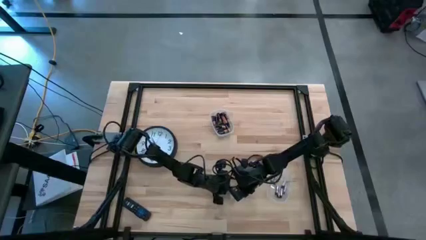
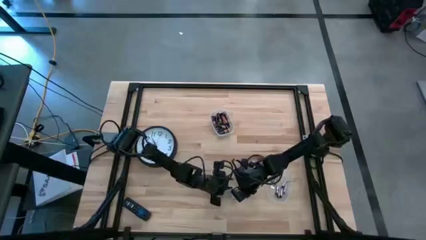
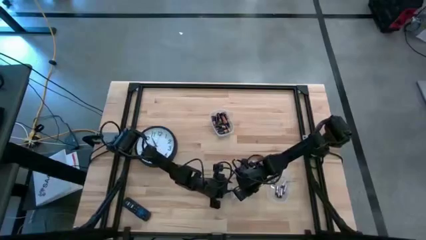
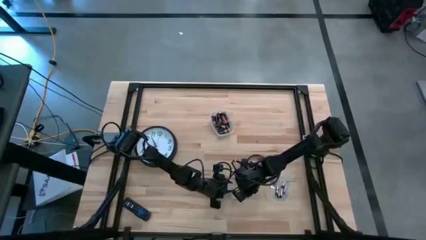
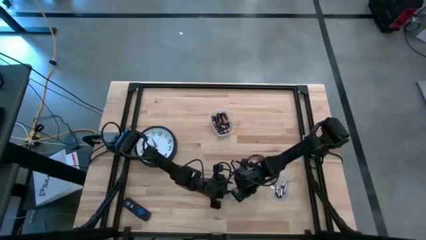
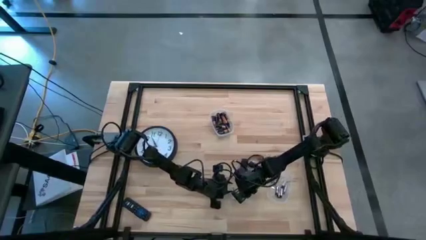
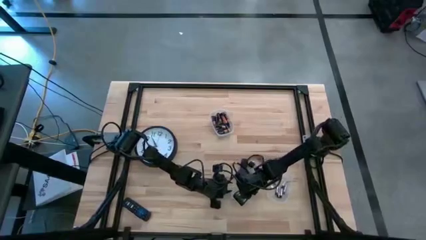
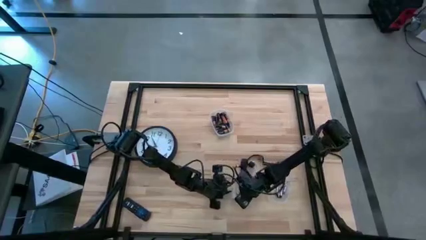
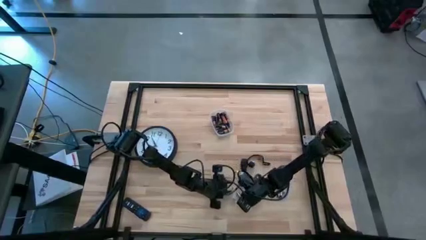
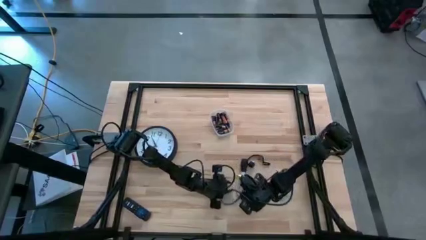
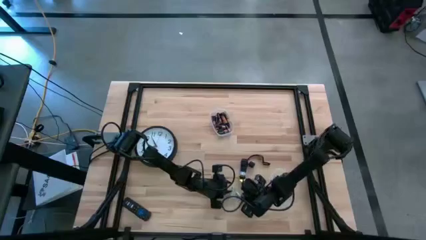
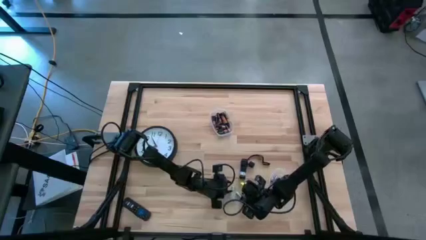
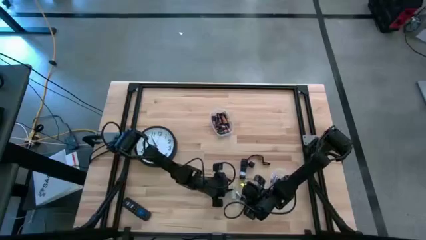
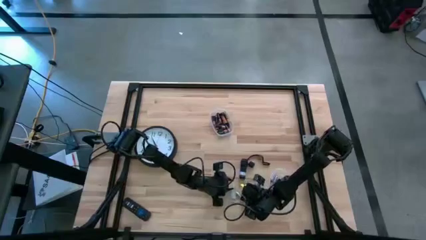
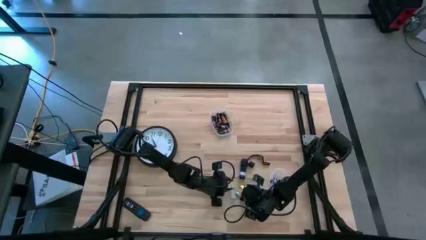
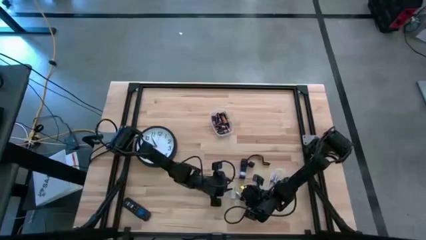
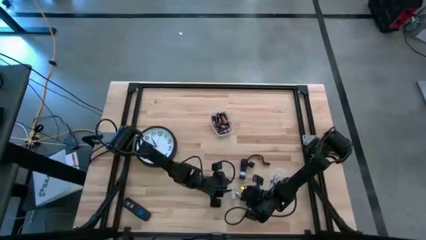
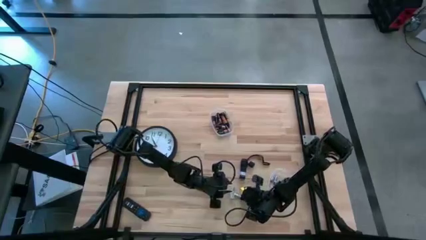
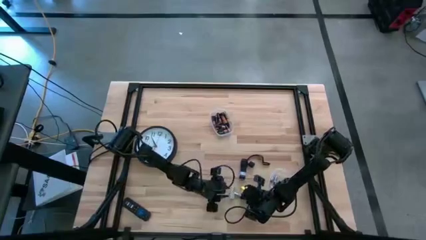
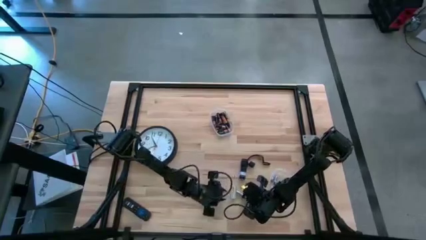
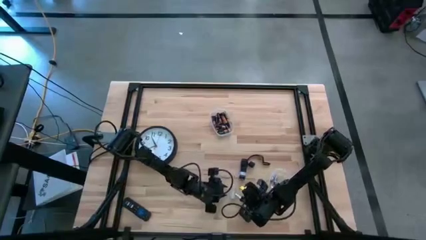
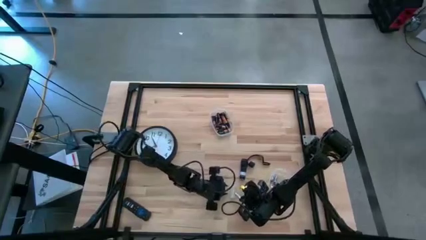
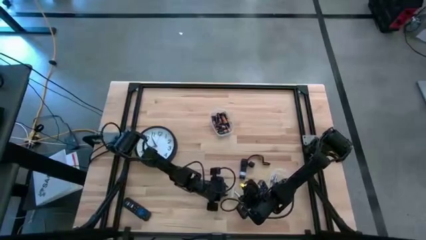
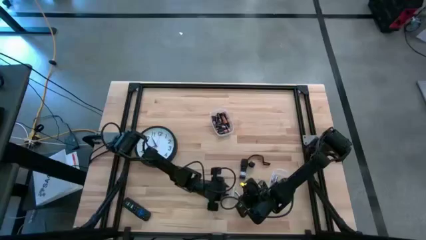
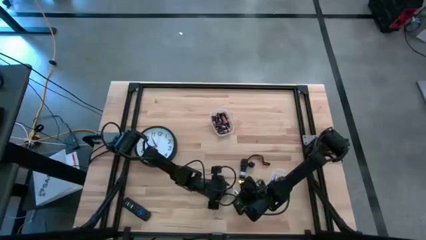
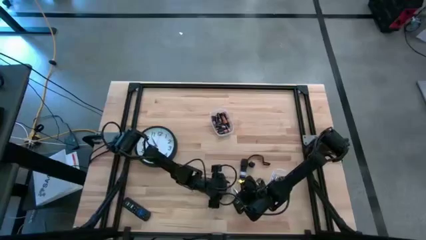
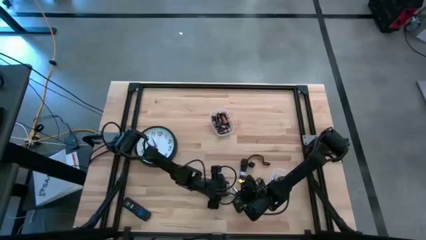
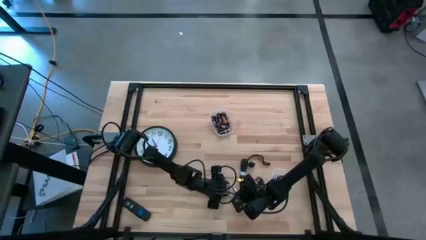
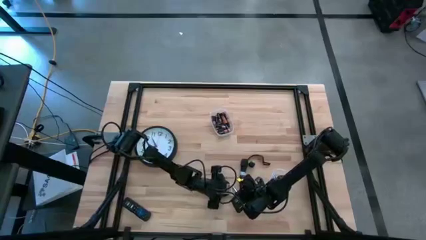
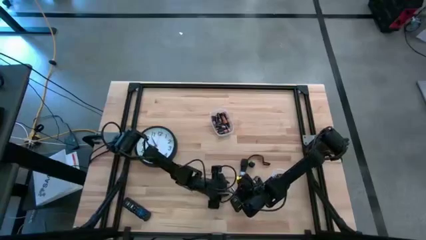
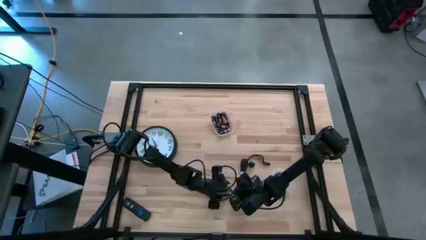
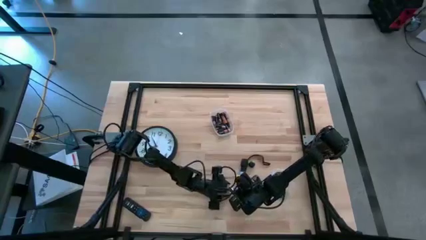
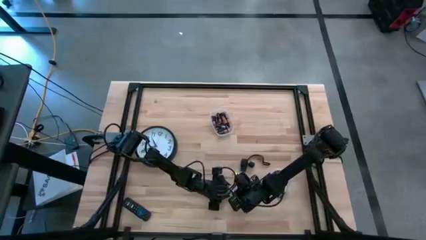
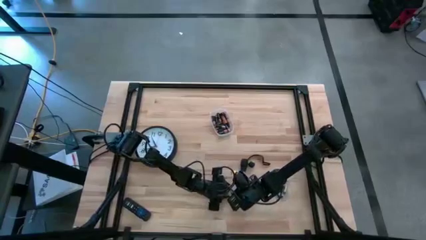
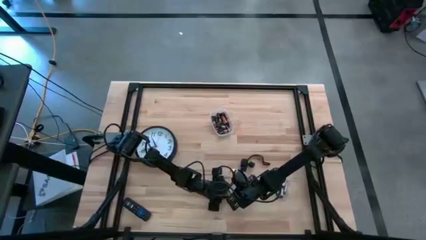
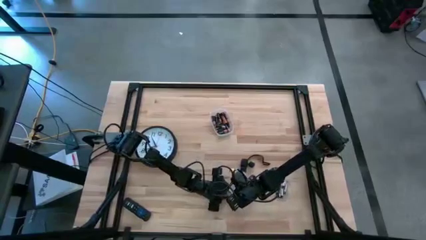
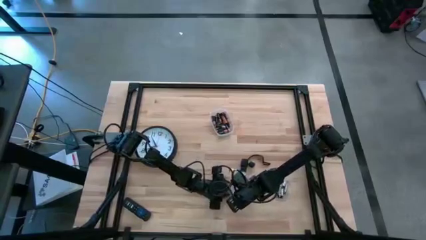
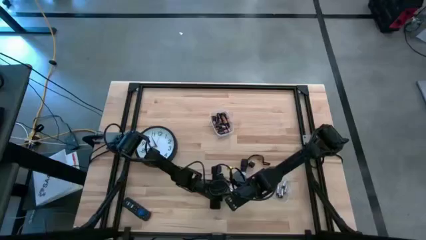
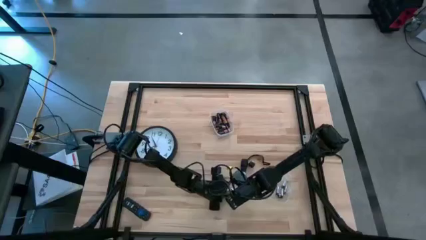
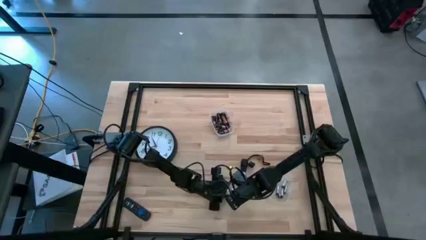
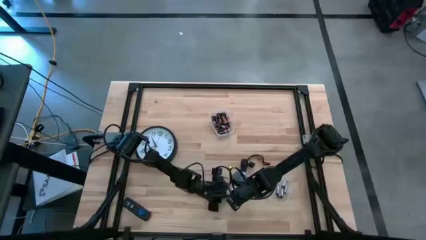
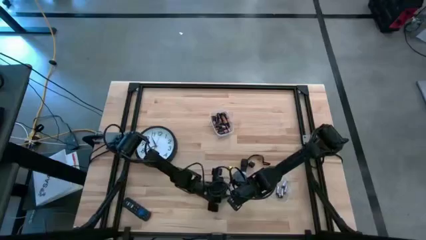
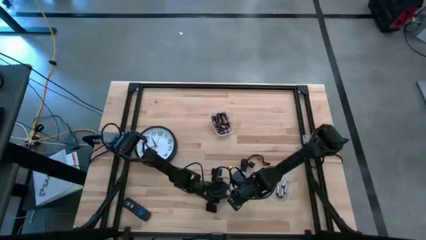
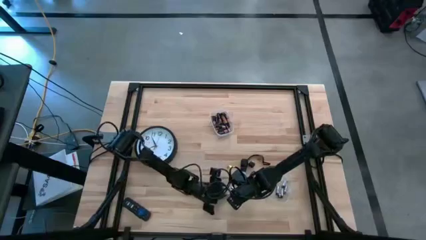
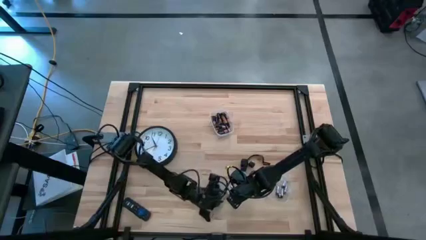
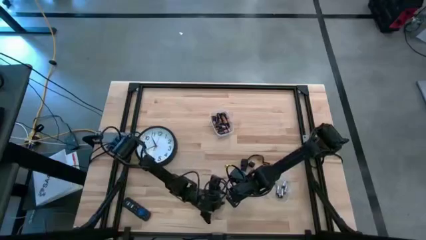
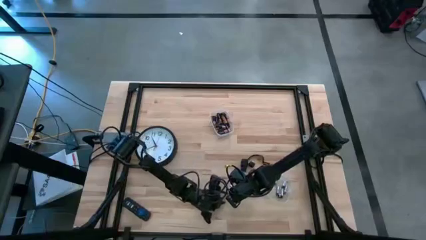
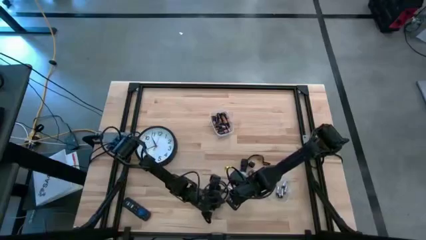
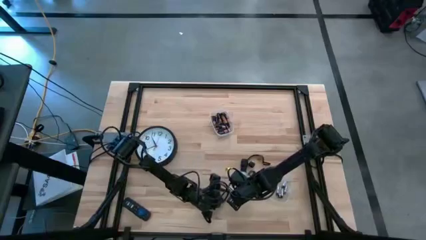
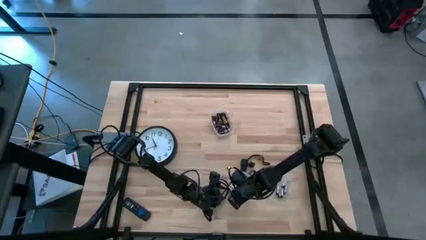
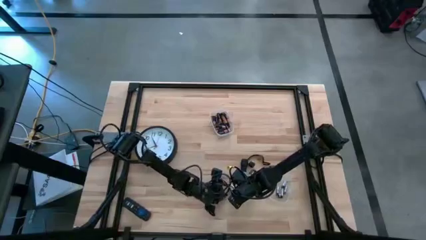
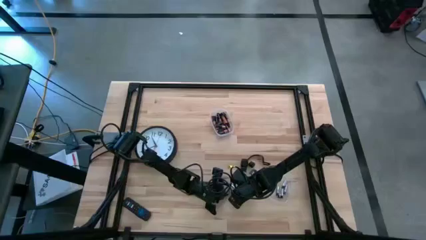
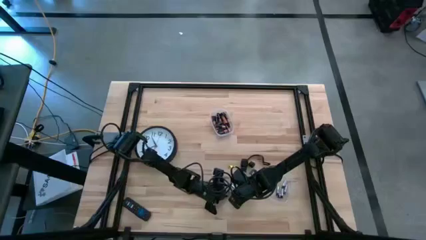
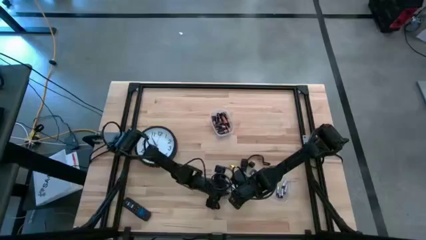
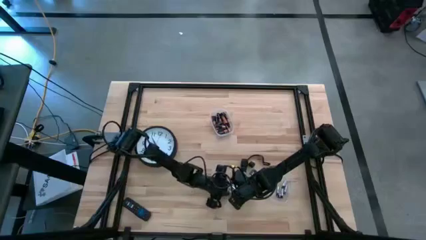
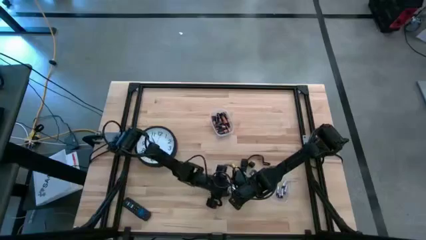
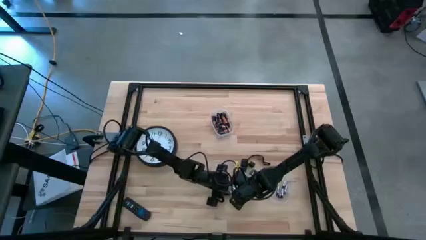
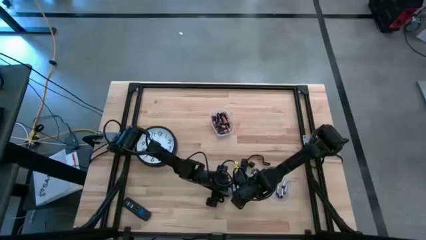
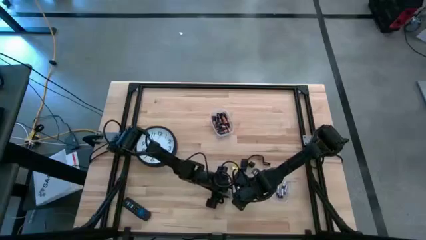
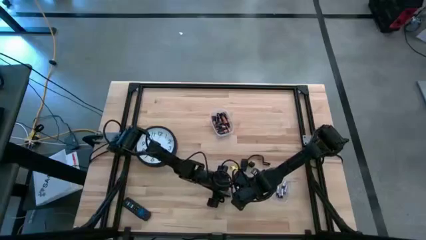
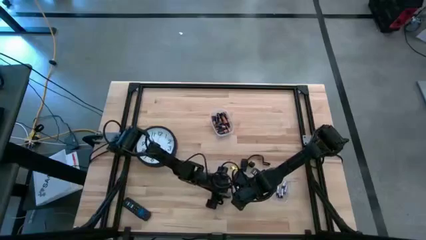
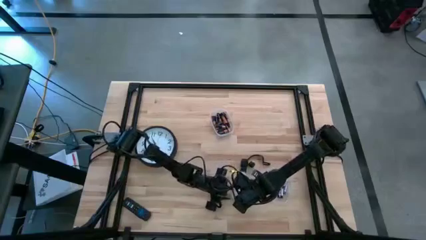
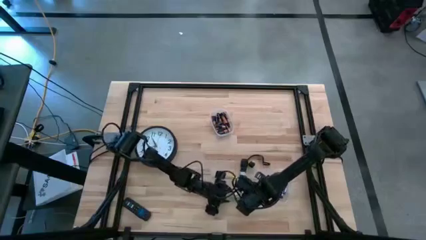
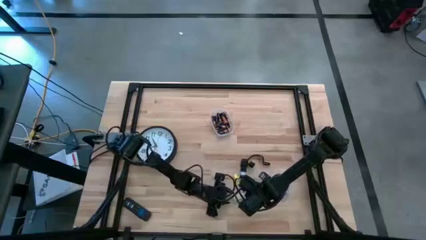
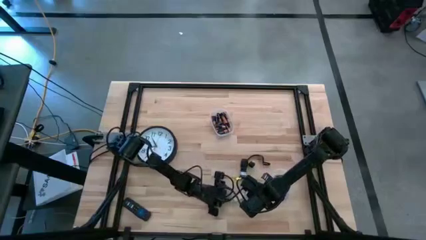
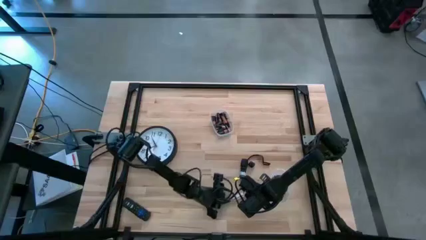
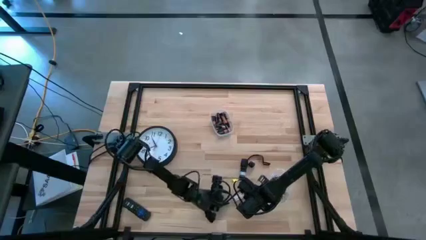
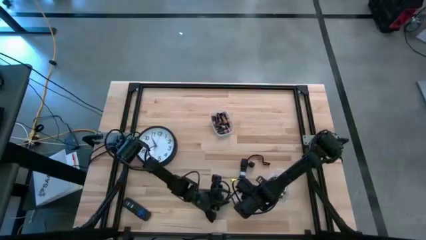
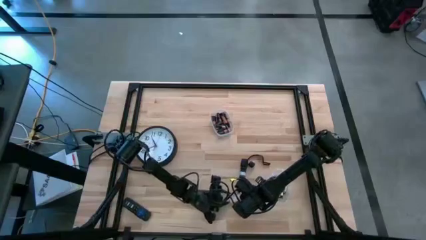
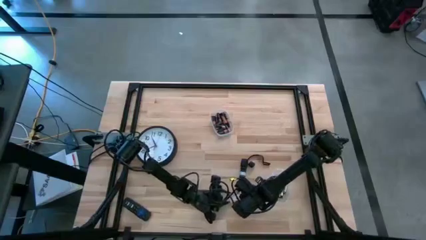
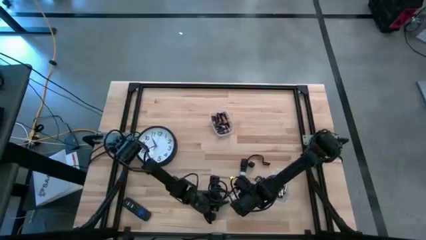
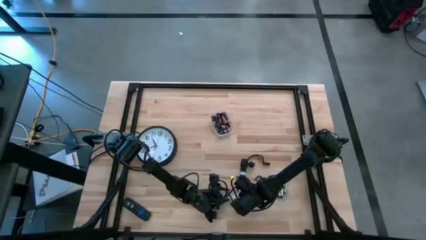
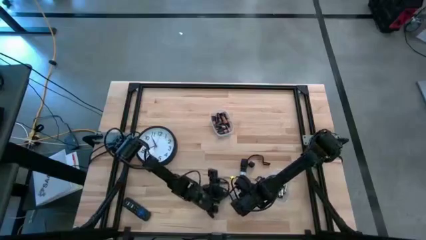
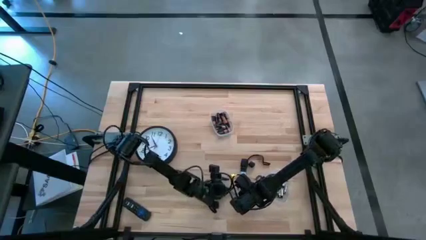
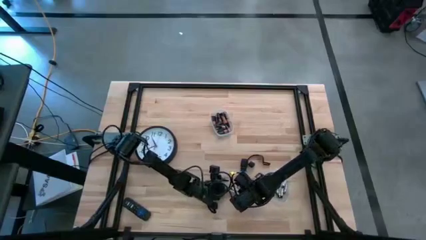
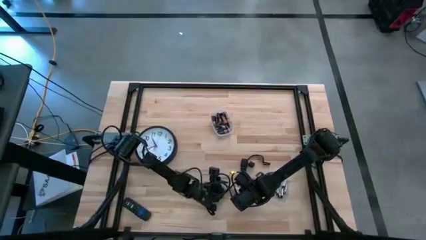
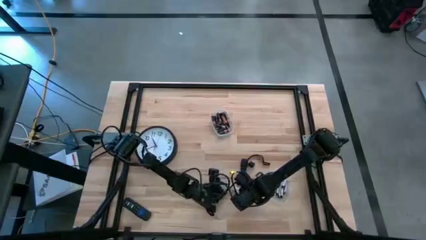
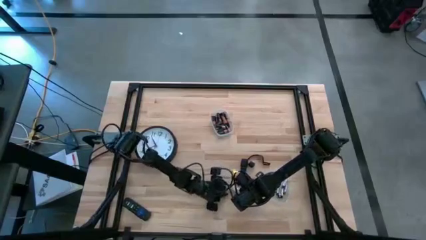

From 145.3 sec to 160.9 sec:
Task: Insert battery
Insert the silver battery into the battery holder

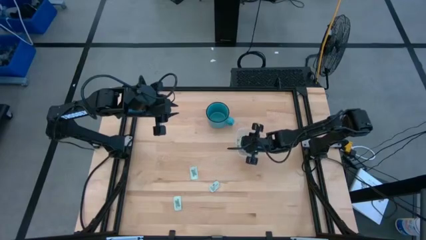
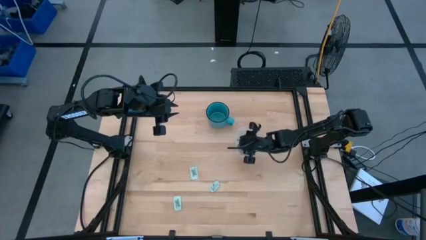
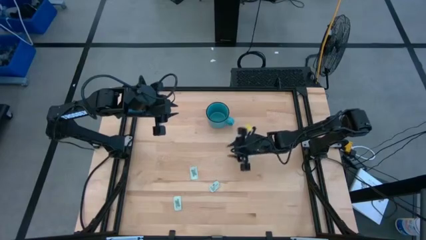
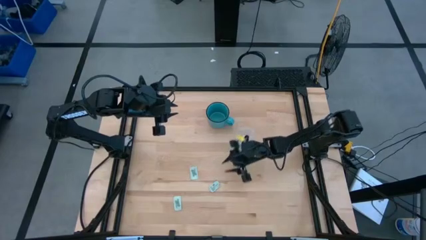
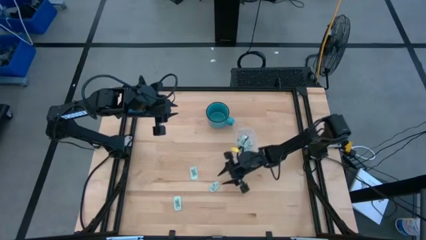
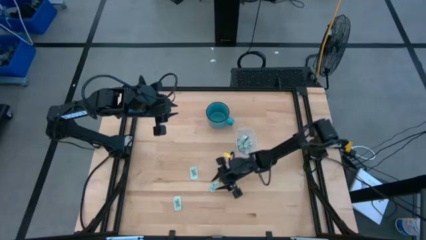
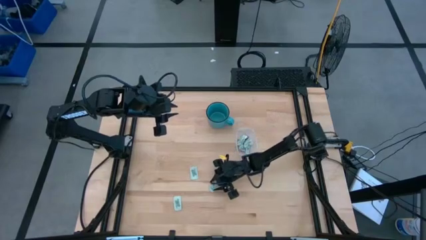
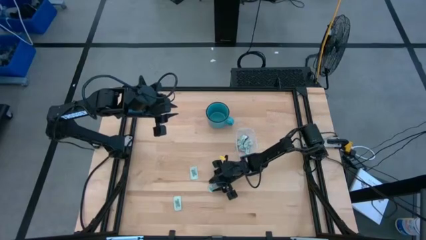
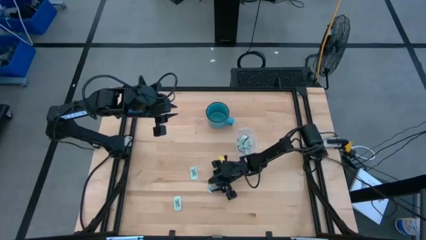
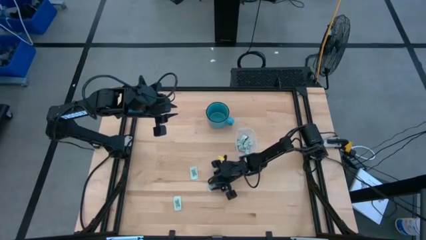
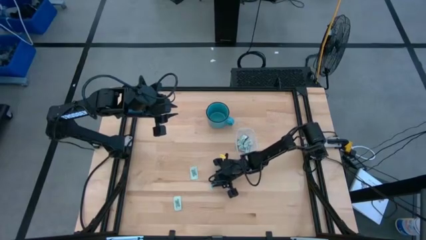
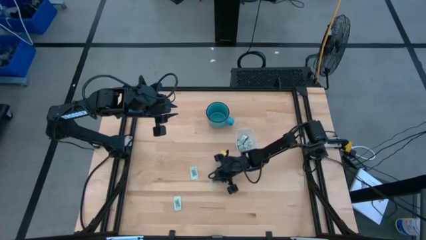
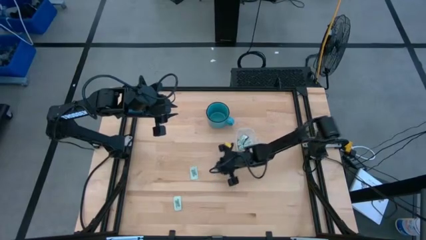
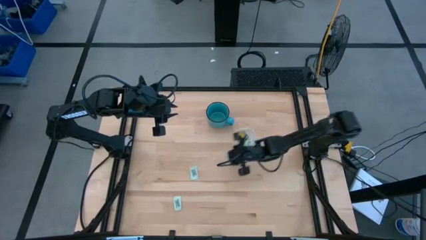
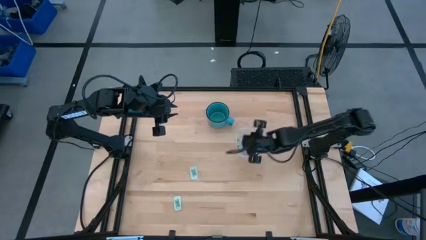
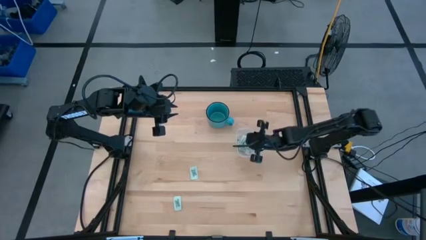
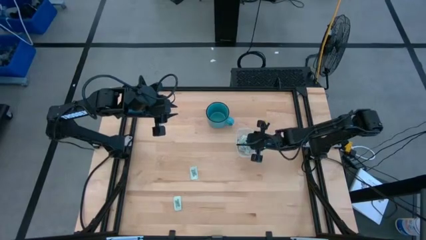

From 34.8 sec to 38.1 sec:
Task: Pick and place Stevia / Truvia into bins
Put the stevia packet into the transparent bin
